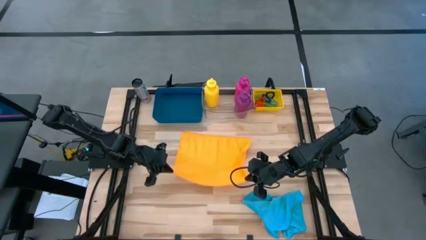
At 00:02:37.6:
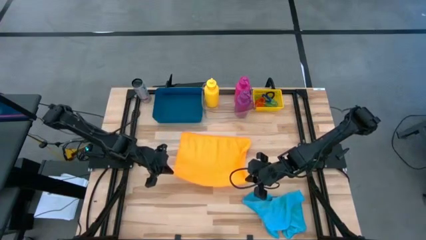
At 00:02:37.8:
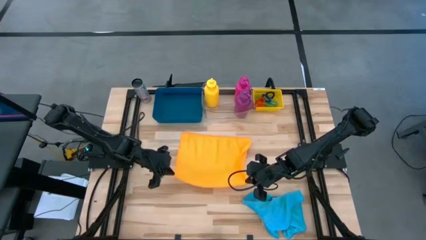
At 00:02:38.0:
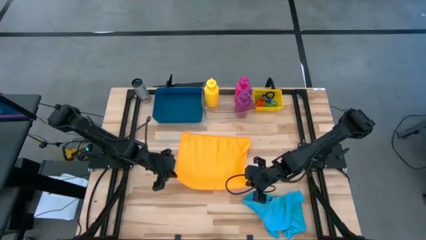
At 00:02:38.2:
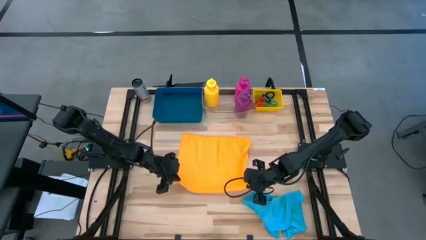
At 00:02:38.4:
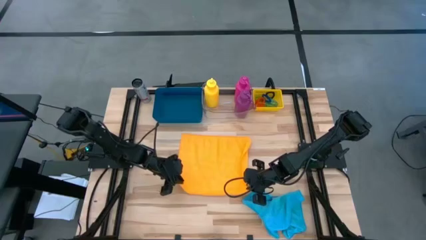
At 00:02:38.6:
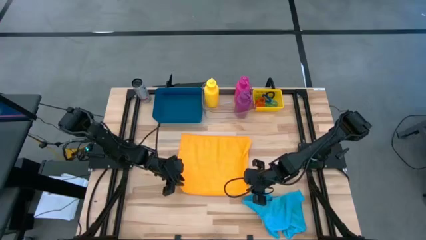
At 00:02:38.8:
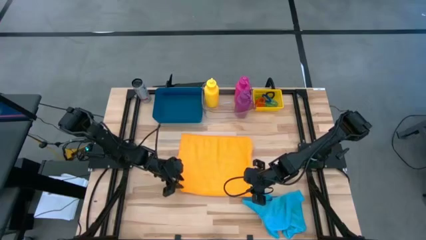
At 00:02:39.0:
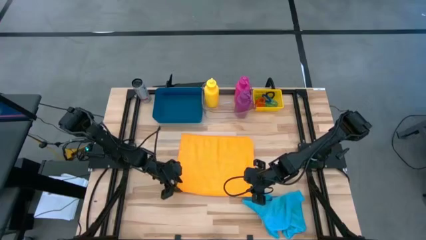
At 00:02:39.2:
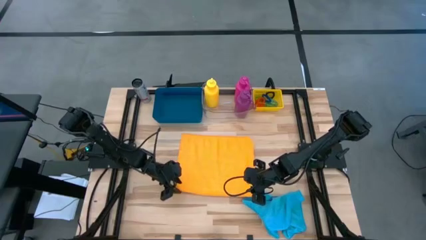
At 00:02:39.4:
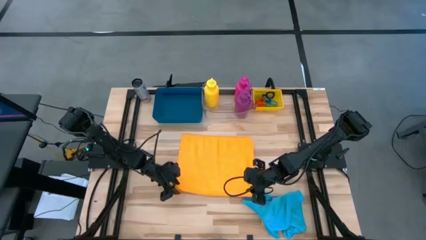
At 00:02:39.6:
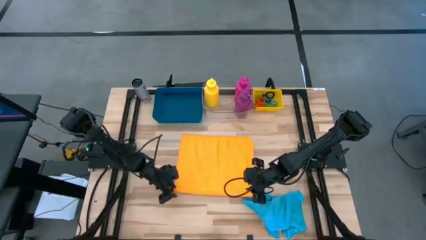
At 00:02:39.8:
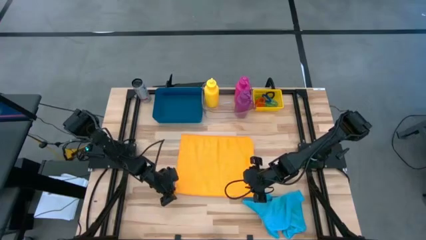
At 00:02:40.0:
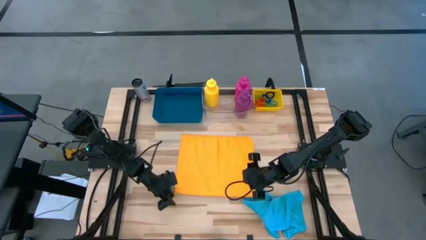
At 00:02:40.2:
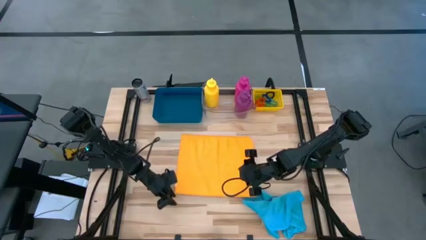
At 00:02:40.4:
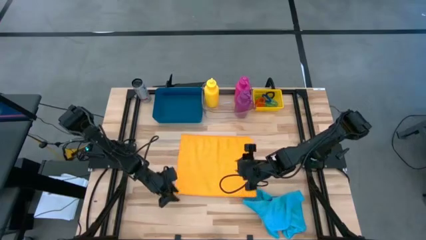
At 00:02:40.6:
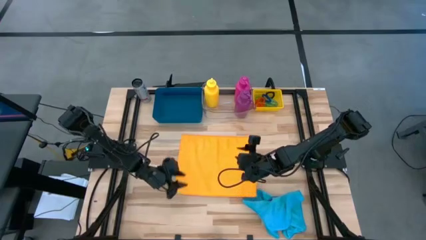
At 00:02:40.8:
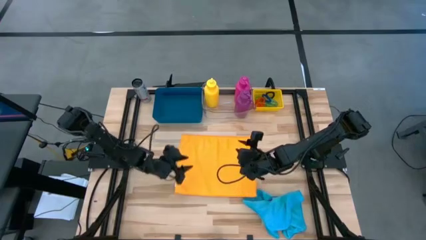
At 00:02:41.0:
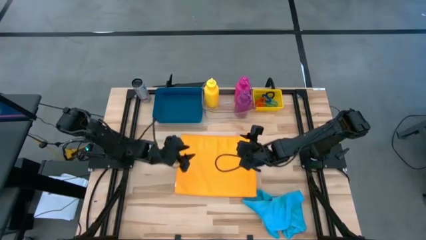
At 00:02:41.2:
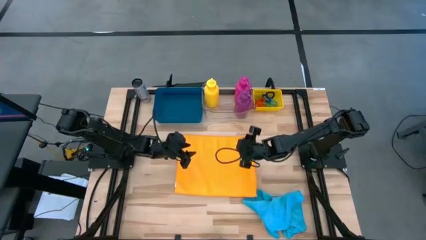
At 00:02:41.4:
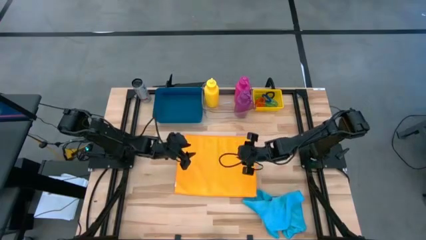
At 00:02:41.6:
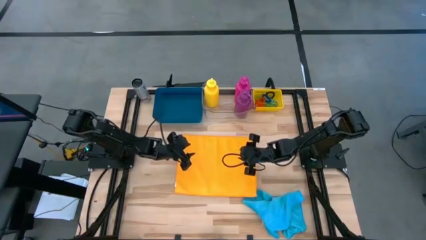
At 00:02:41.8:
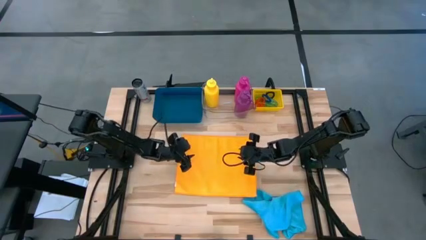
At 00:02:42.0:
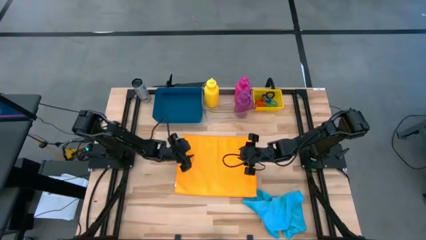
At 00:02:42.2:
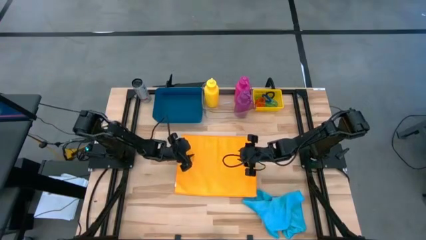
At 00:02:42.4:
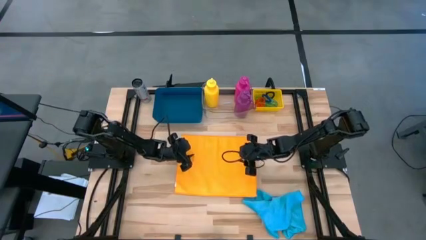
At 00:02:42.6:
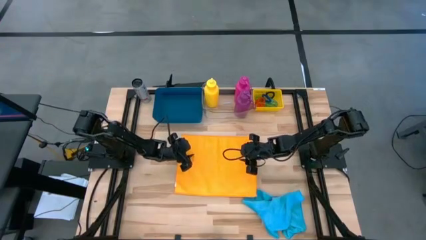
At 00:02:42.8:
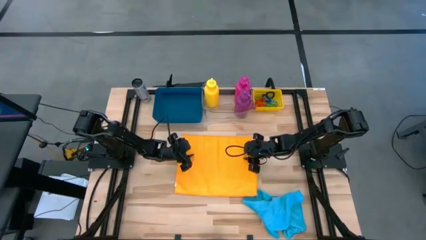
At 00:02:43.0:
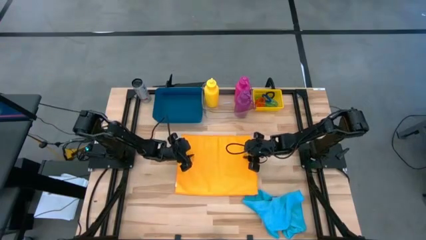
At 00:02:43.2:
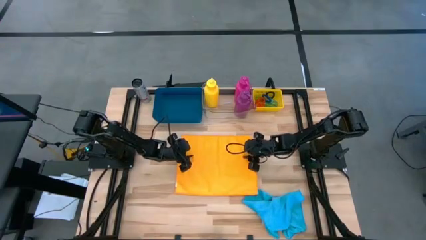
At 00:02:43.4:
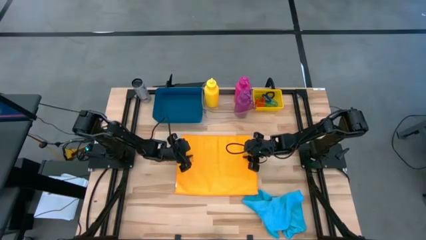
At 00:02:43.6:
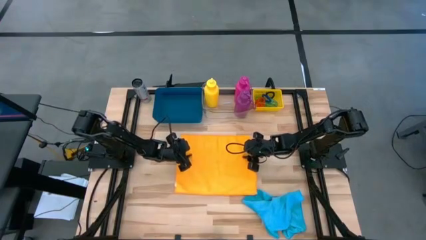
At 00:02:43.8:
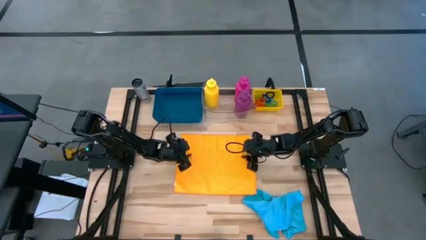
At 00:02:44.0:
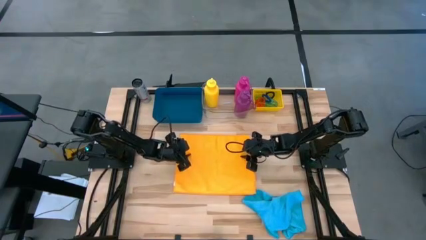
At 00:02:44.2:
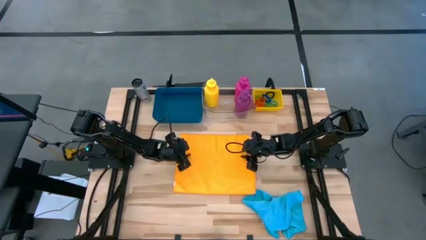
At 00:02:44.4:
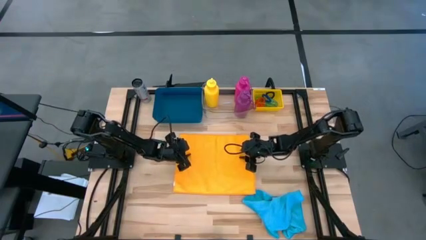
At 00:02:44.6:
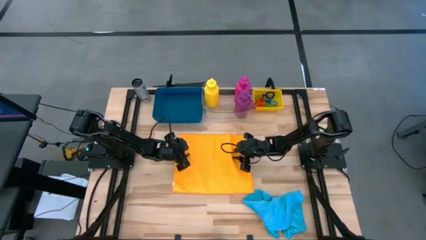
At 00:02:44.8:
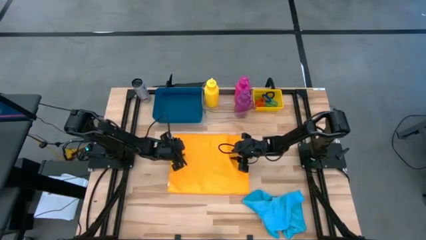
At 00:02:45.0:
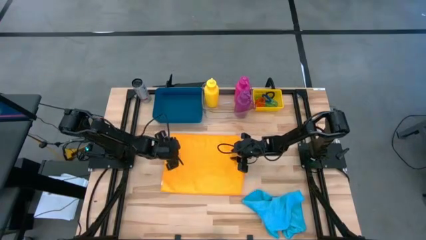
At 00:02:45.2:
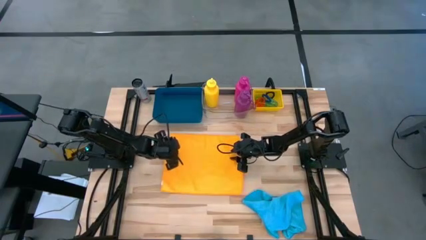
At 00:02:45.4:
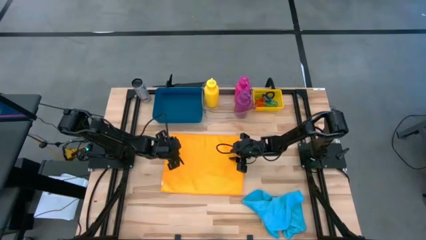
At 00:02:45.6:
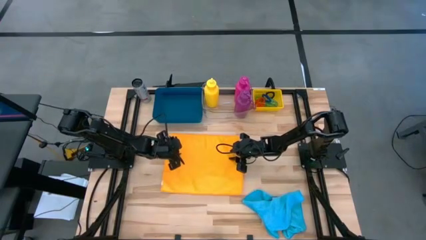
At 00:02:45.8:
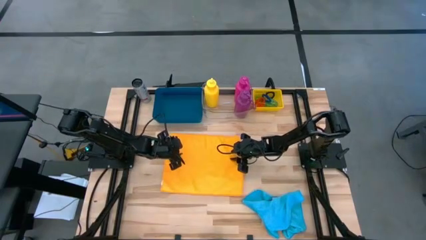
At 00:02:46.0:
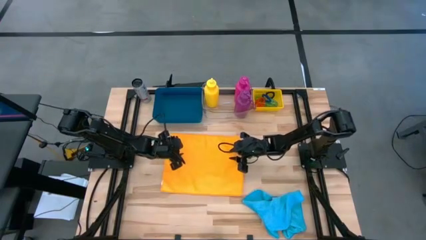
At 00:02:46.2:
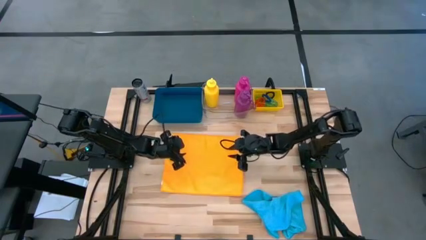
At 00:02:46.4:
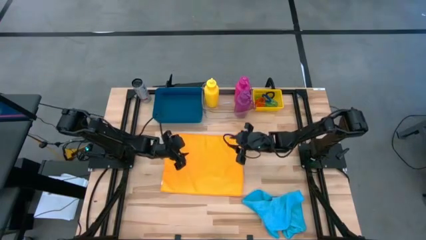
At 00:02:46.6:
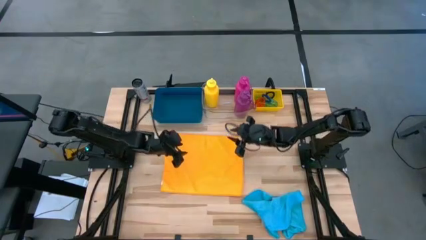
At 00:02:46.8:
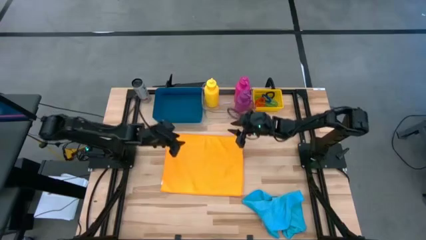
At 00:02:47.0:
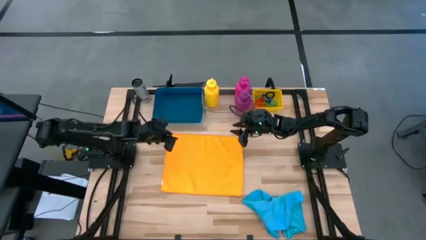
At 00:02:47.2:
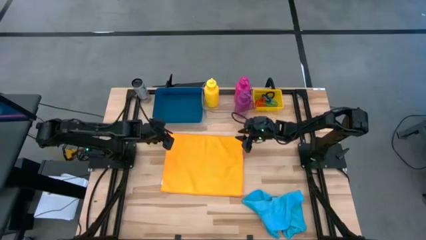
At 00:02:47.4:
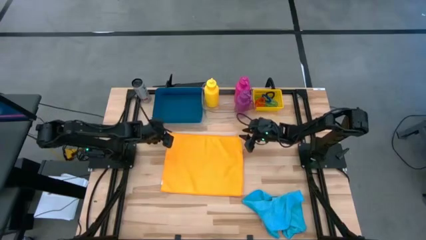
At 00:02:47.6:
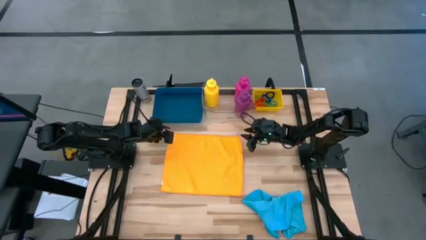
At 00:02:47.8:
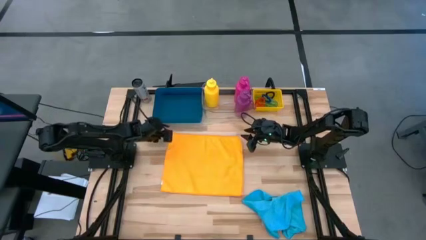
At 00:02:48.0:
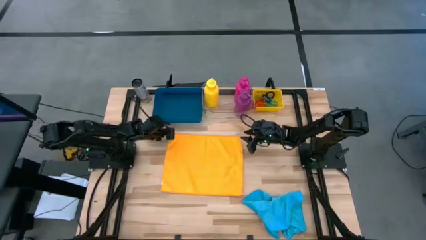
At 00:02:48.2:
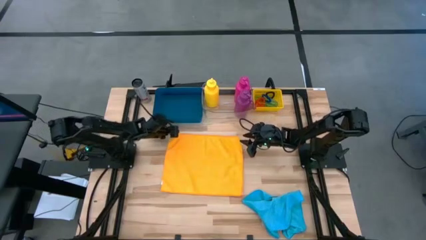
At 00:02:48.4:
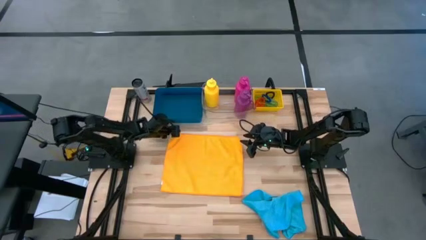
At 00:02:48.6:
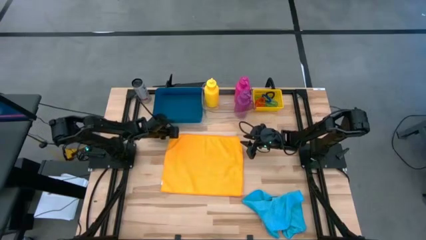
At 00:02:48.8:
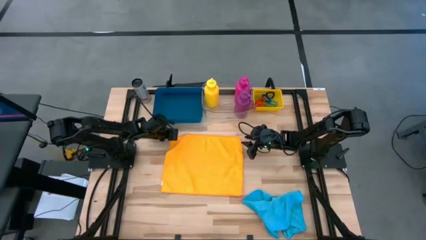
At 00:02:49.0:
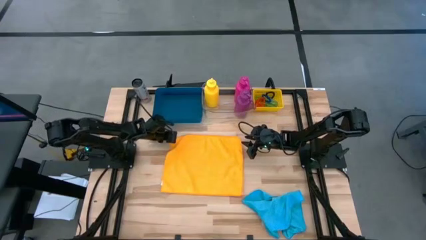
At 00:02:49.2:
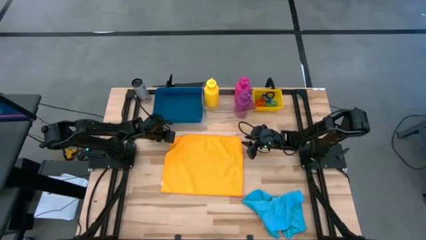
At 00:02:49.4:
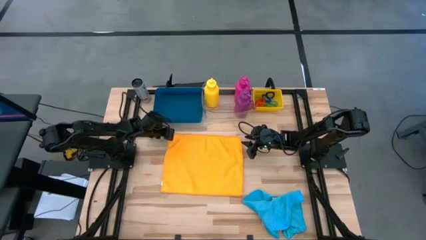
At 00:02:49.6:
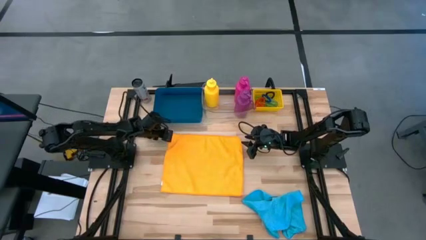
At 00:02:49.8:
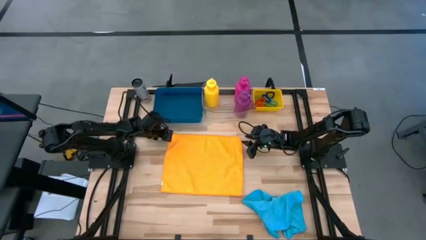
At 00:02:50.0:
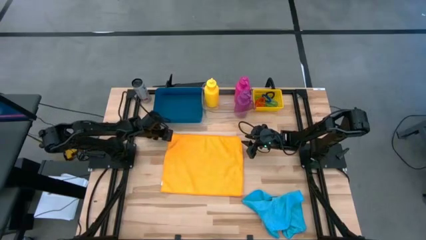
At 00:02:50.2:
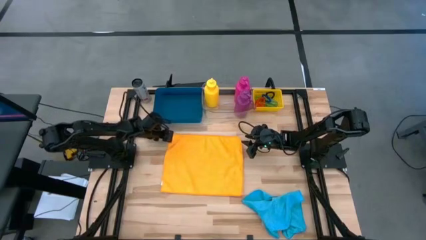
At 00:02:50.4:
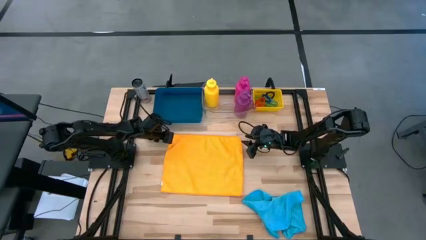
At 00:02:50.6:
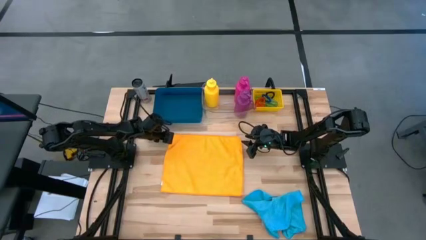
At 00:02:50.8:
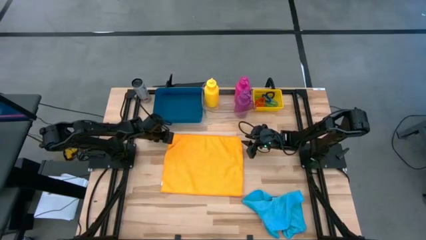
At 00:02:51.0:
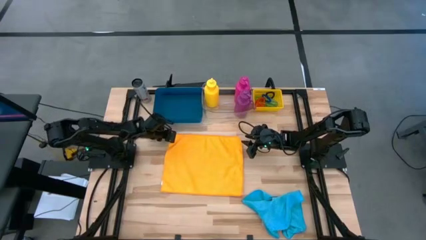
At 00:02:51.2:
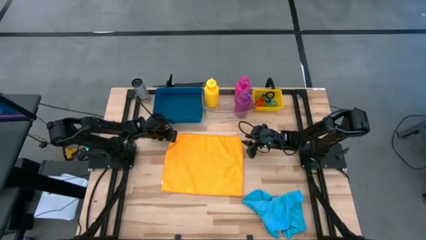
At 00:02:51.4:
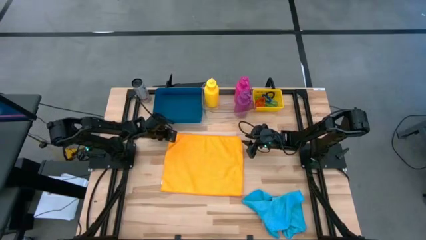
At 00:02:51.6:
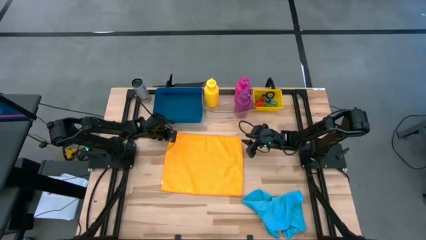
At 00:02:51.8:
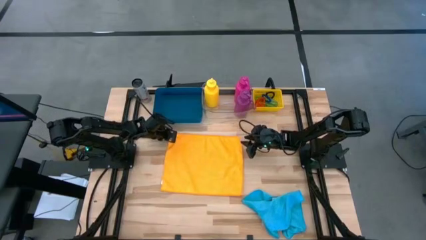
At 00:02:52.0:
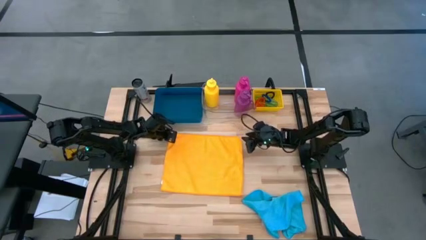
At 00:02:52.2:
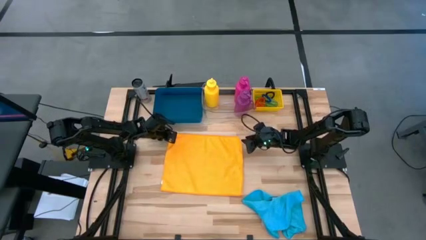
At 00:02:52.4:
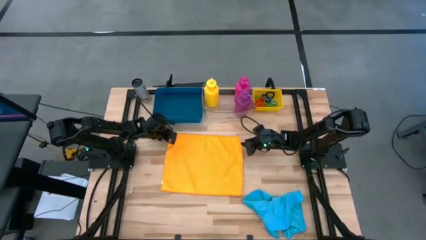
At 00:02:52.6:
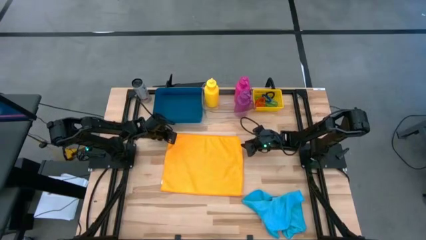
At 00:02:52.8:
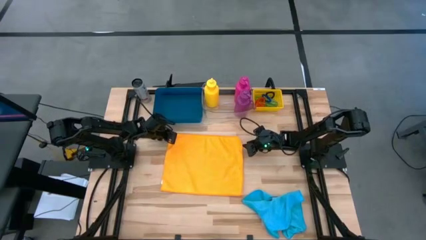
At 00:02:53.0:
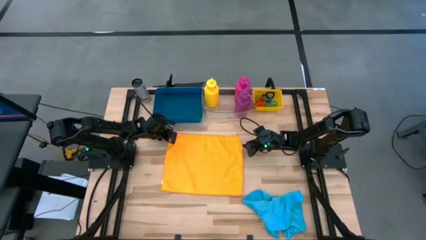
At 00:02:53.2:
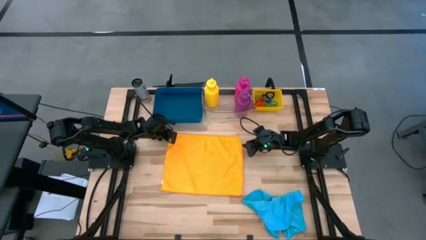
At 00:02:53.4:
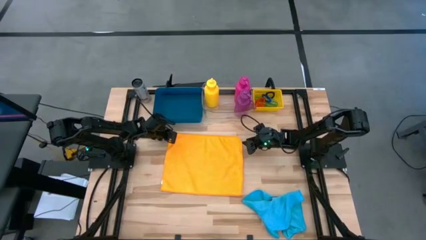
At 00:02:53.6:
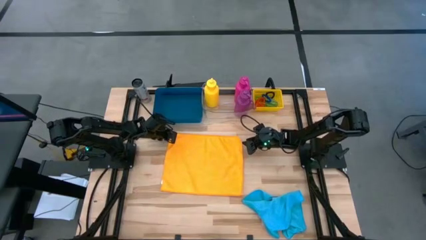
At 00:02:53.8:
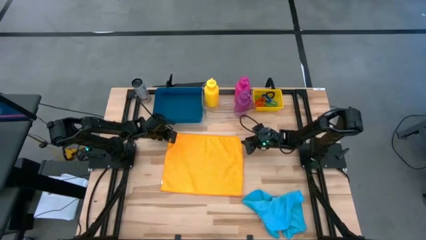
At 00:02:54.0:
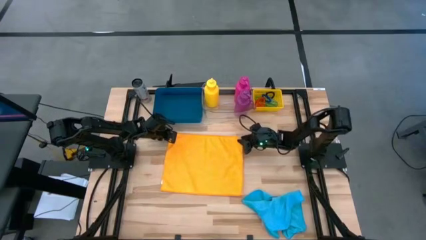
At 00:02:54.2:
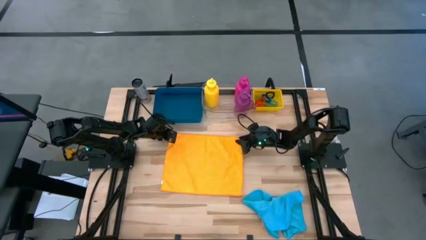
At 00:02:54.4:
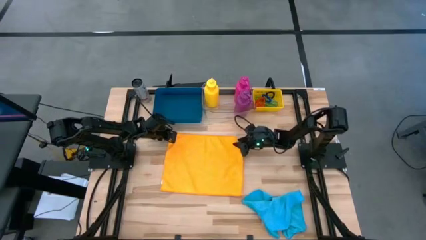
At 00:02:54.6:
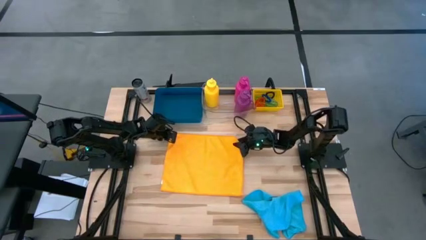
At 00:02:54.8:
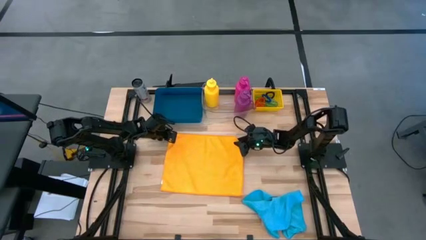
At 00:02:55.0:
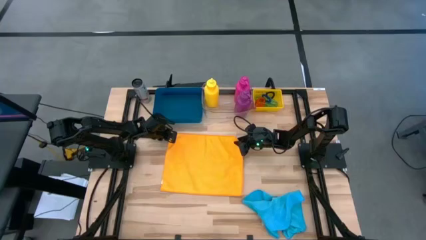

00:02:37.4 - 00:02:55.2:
Task: Pick & Place Sports Items
Fold the orange towel
